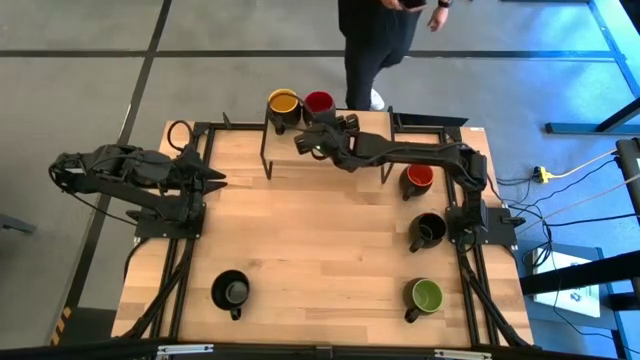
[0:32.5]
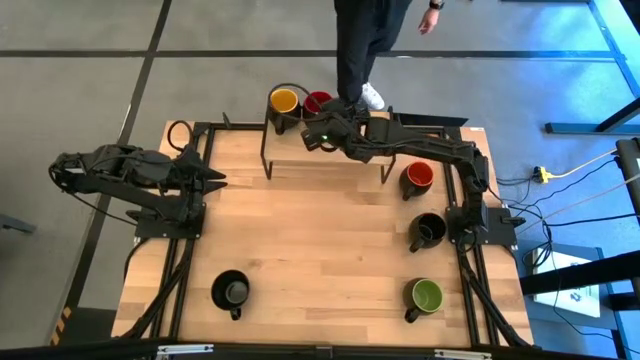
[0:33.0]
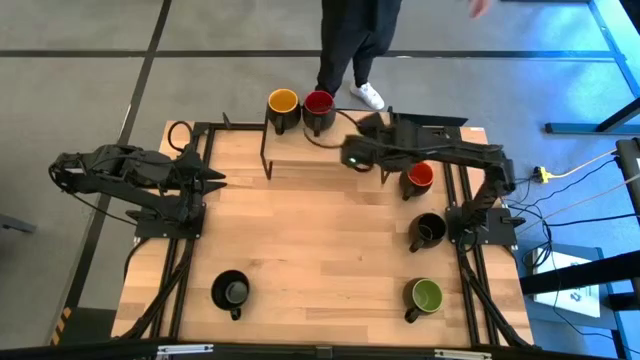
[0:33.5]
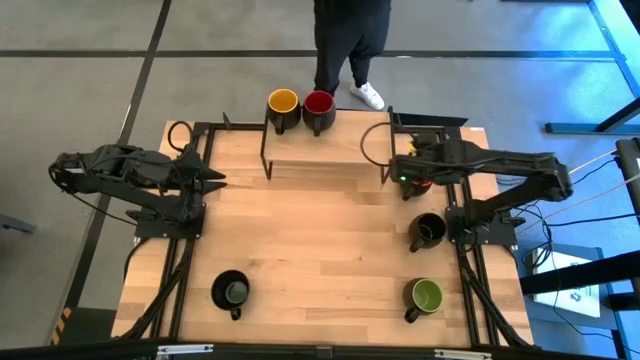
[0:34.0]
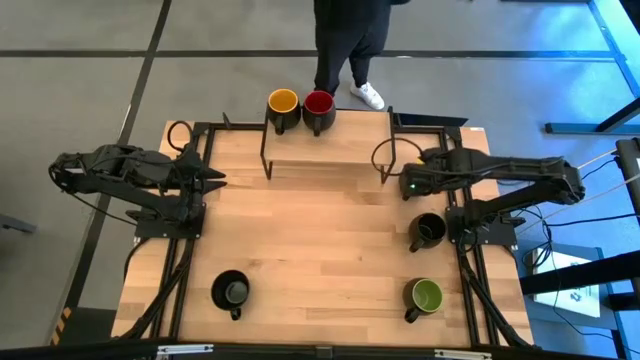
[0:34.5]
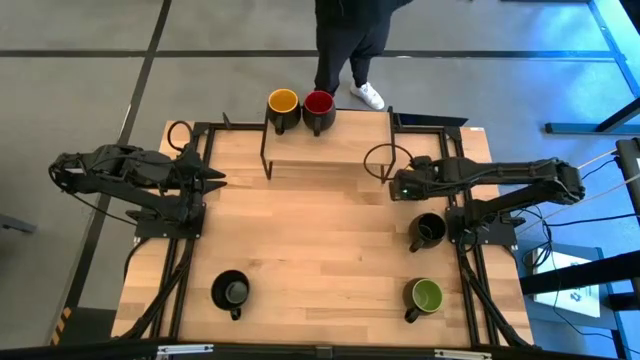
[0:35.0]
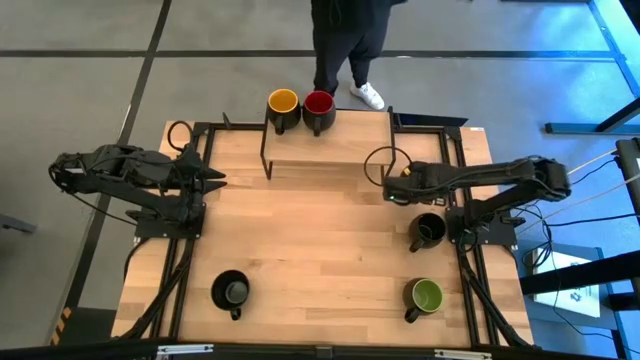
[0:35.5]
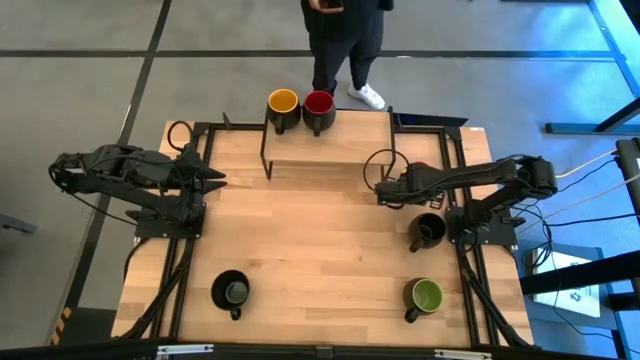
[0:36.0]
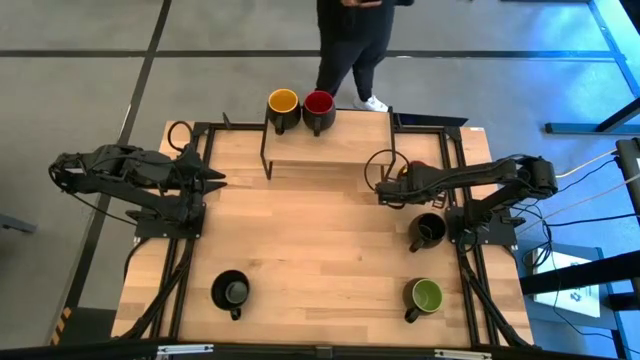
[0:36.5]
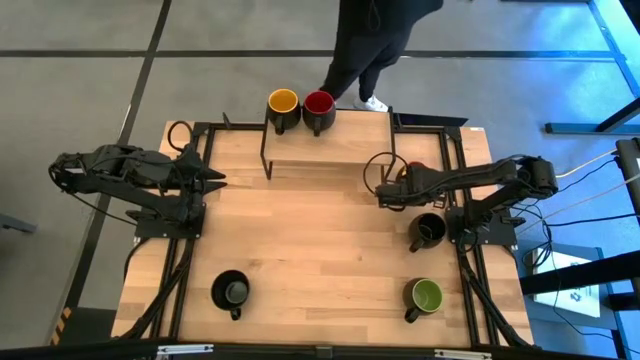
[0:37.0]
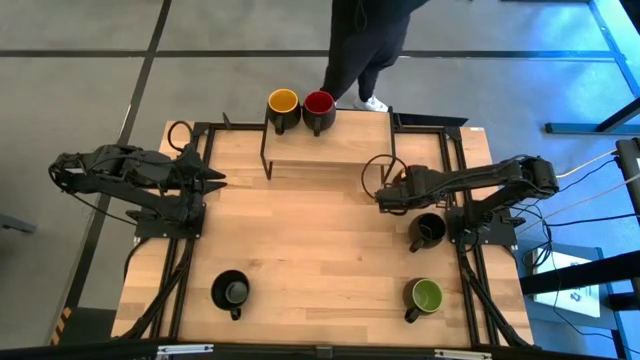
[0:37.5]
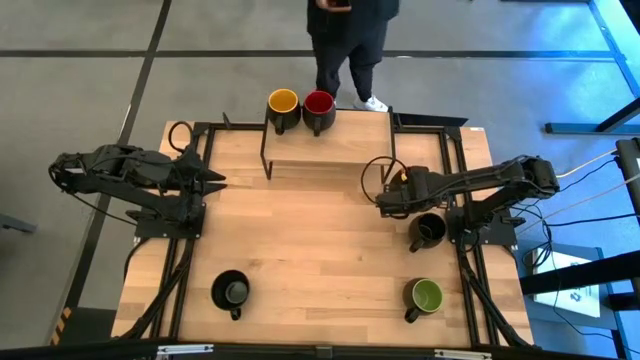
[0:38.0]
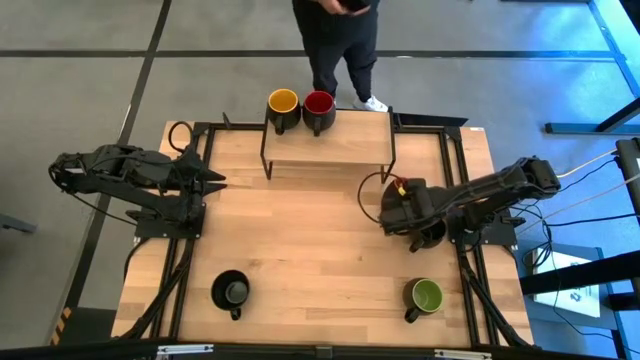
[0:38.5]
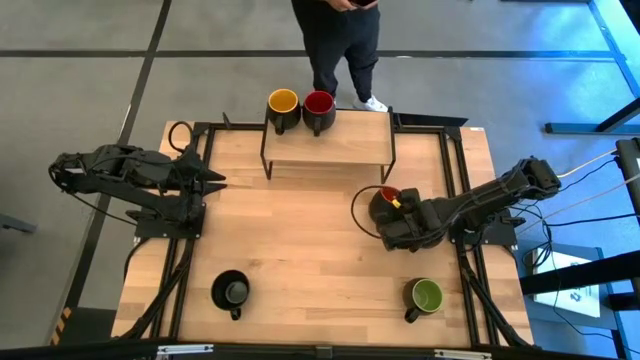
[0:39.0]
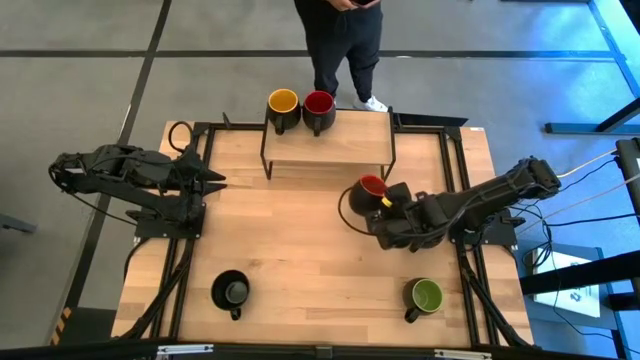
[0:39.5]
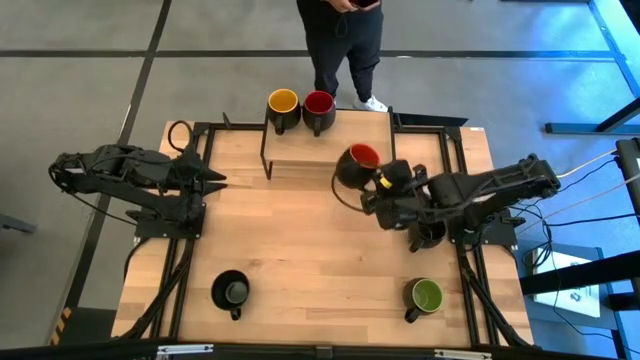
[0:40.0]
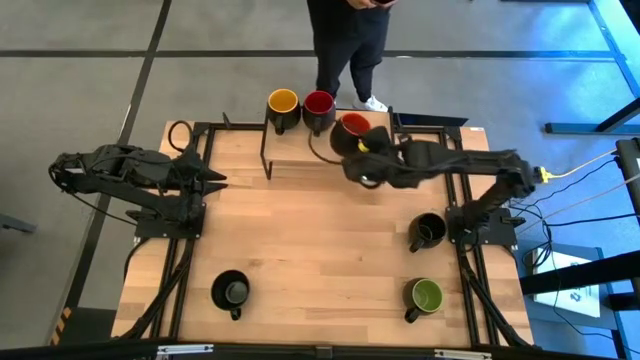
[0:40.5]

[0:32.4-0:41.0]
Task: Place coffee mugs
Put the orange mug on the shelf

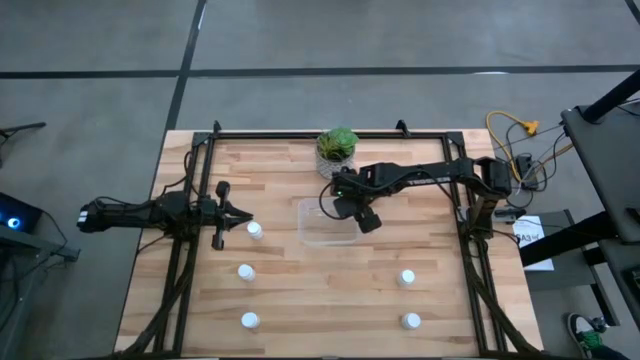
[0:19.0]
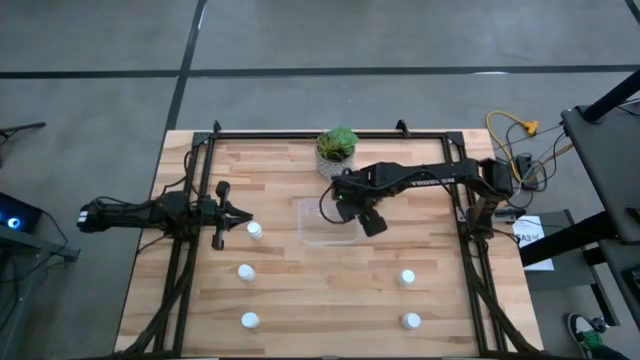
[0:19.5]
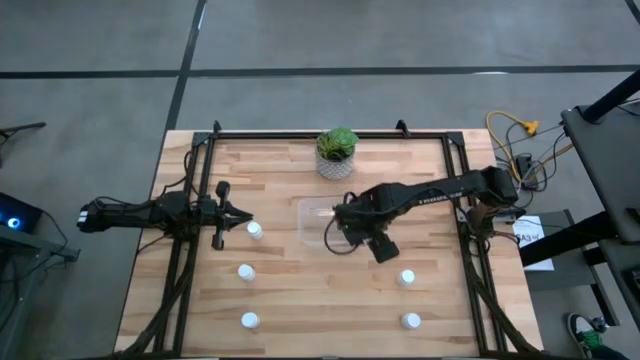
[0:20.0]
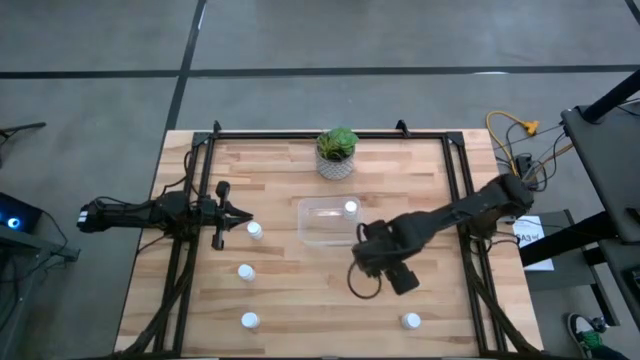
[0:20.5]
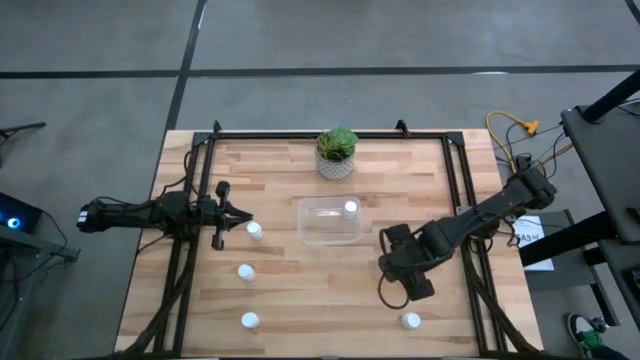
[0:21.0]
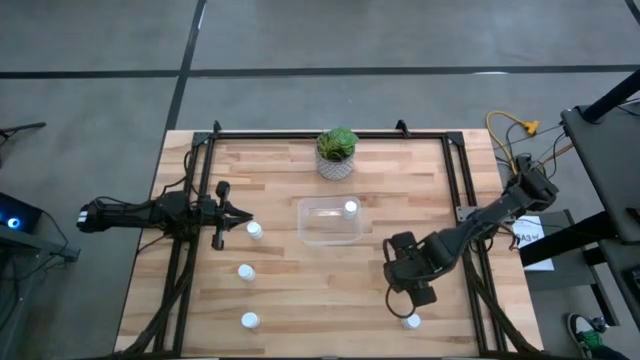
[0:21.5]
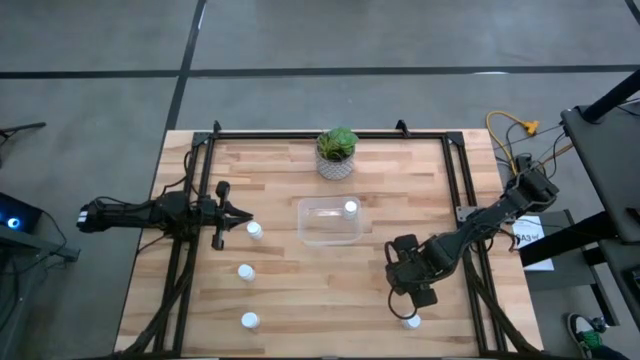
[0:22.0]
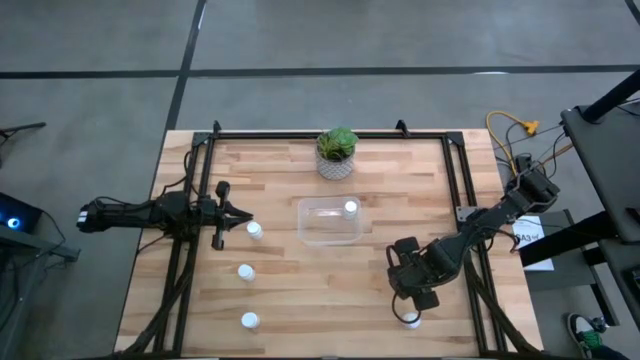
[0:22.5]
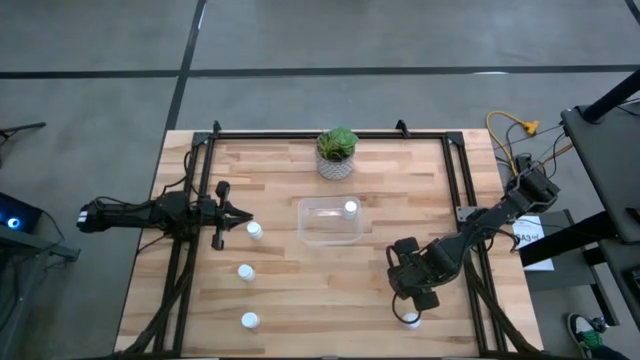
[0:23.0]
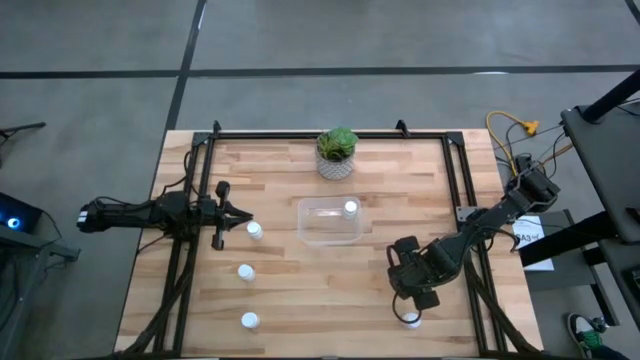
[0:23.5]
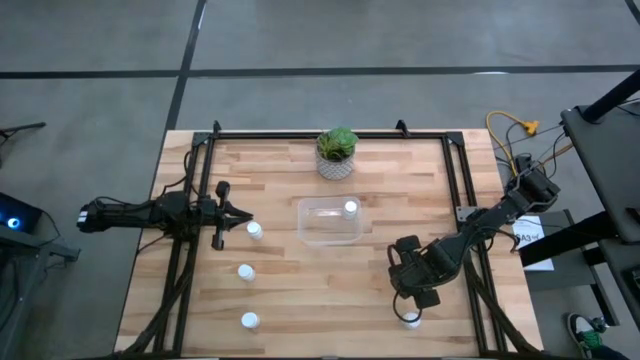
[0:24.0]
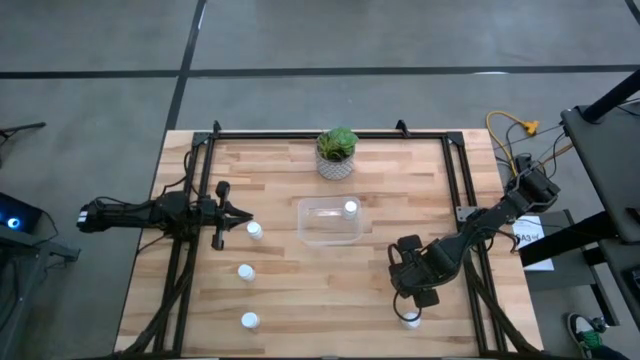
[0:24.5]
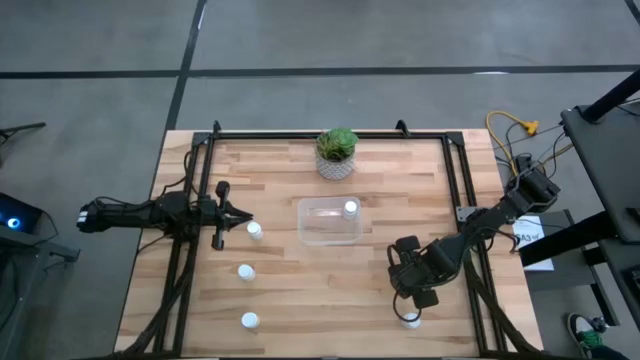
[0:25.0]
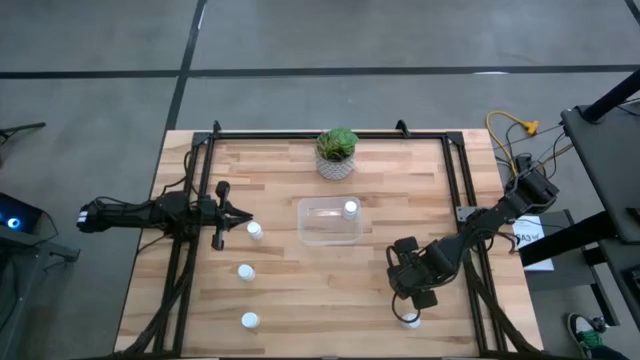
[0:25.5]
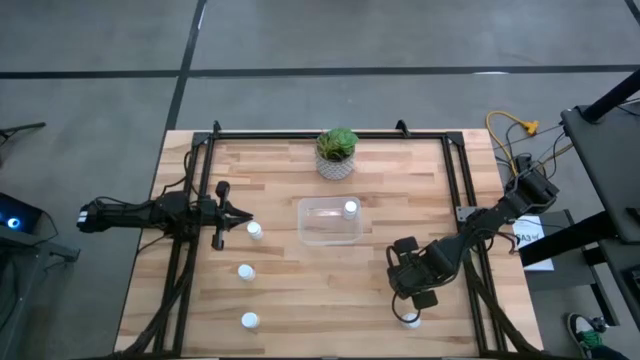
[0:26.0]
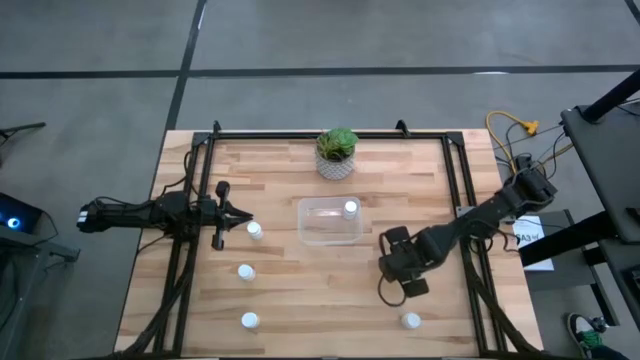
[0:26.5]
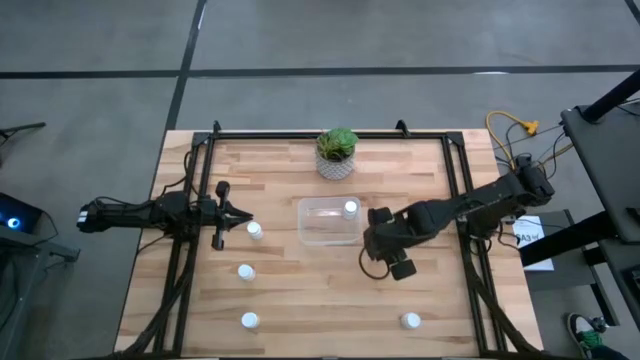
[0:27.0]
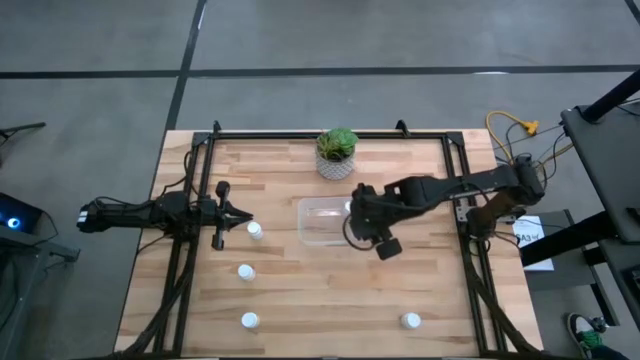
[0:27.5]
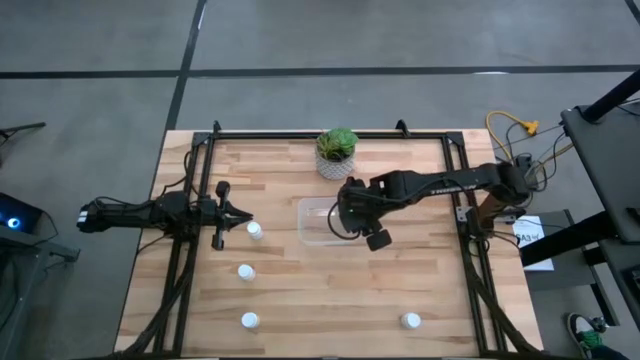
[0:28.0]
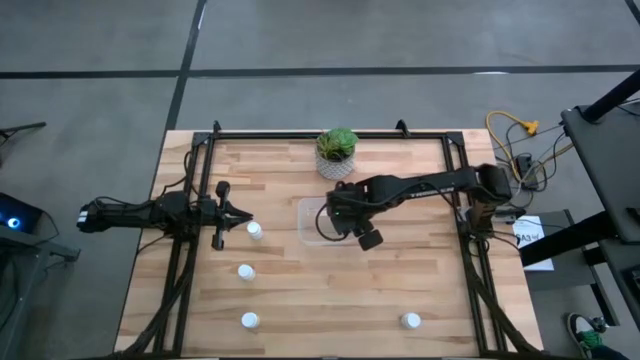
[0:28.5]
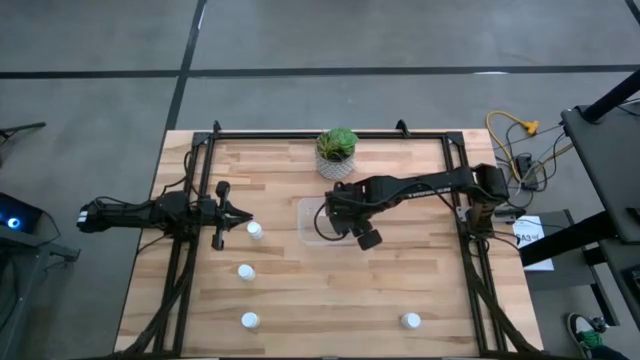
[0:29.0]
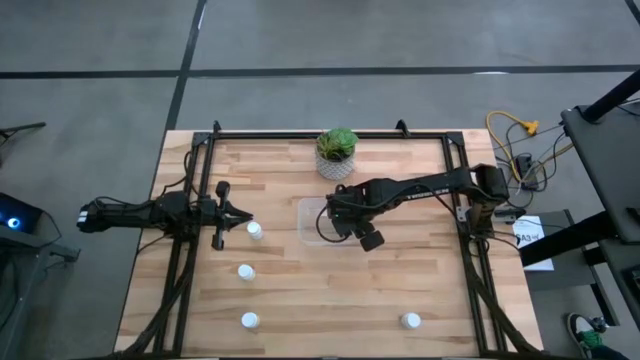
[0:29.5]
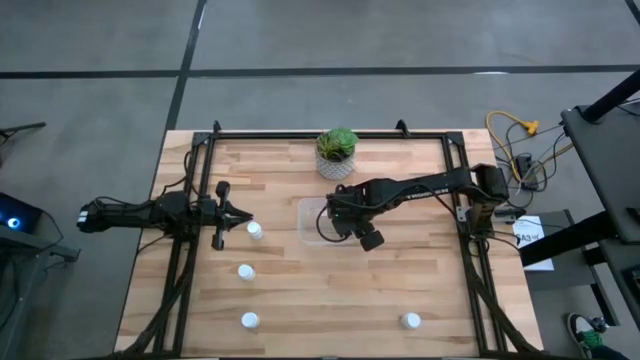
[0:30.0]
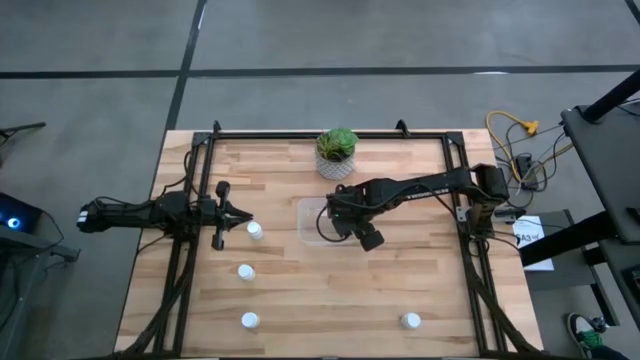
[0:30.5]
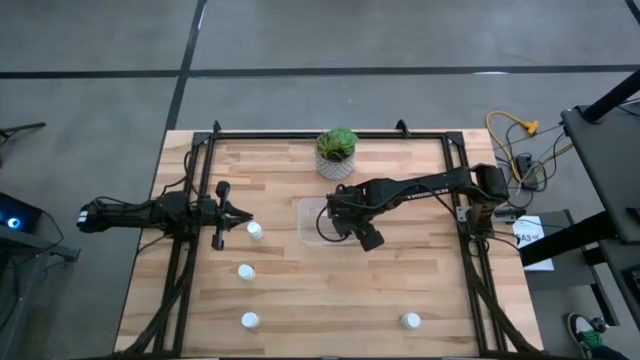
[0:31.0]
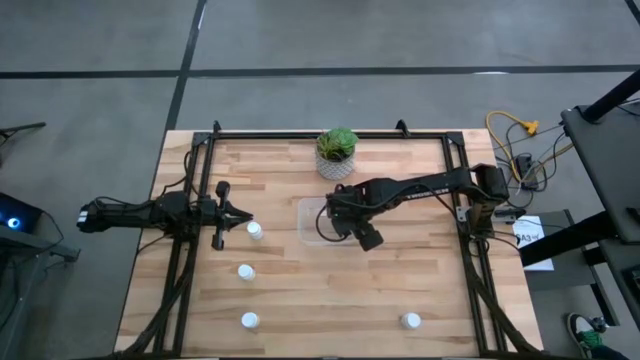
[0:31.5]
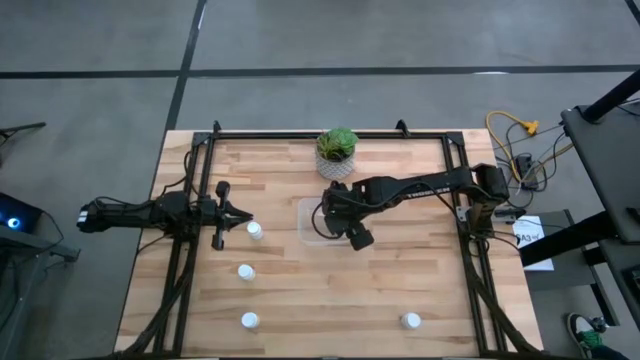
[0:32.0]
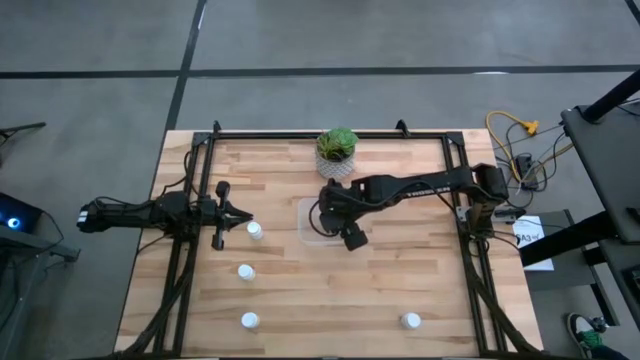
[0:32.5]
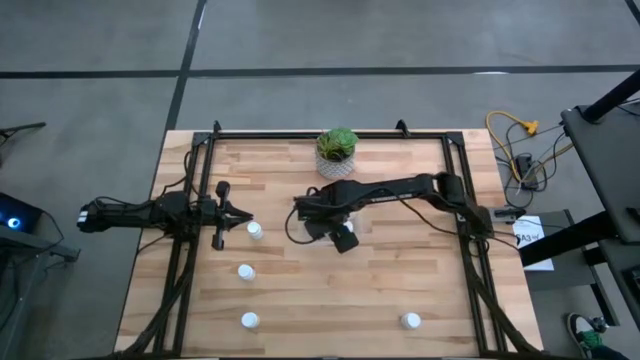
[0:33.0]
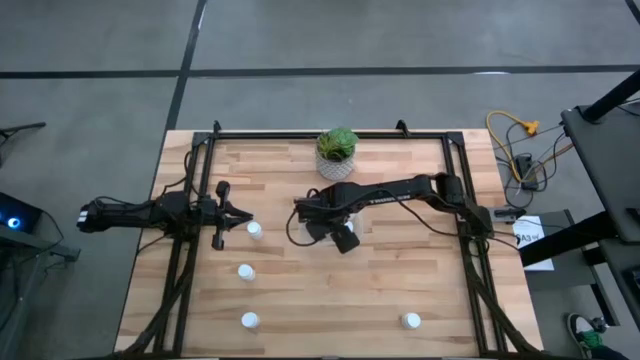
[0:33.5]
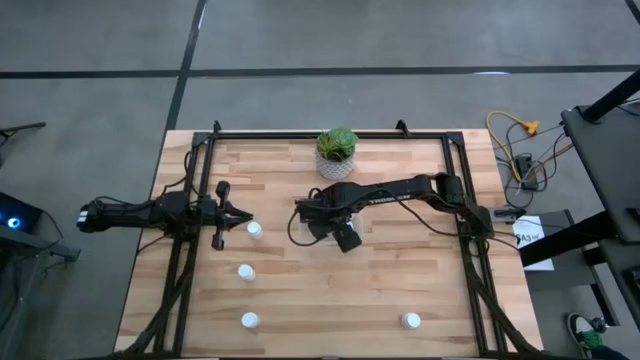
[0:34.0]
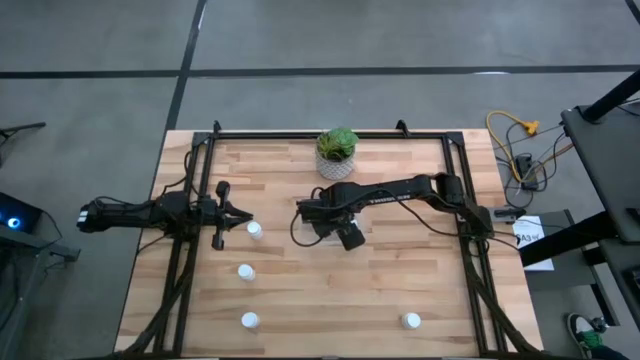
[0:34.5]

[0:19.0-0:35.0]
Task: Pick and place pill bottles into a basket
Put the white medicine bottle into the transparent bin
